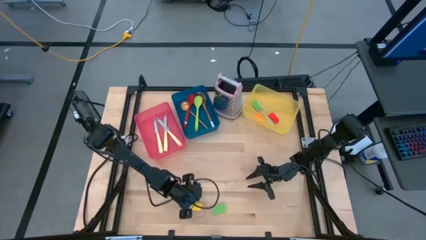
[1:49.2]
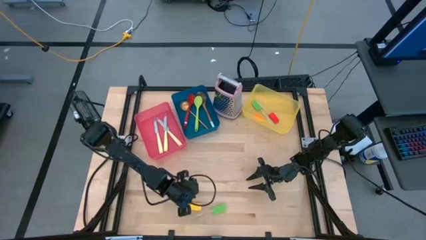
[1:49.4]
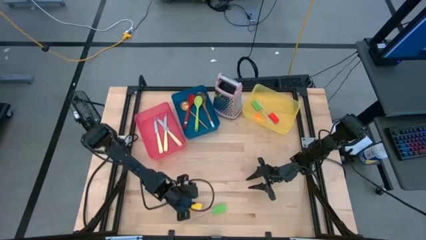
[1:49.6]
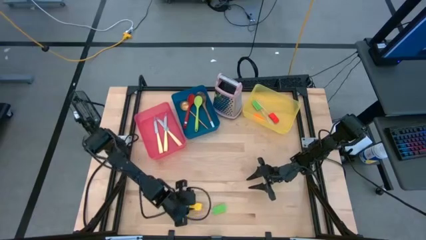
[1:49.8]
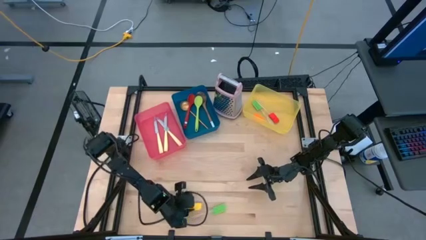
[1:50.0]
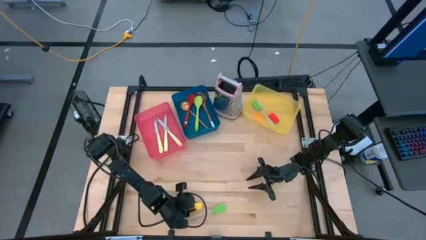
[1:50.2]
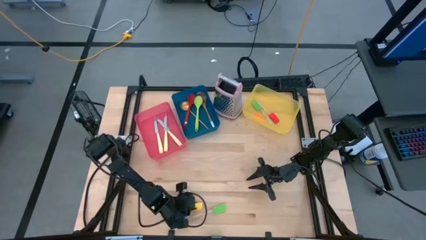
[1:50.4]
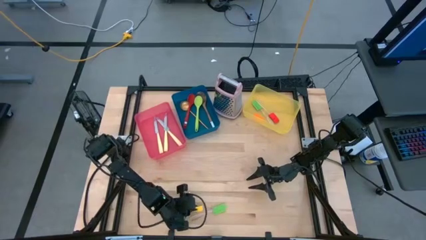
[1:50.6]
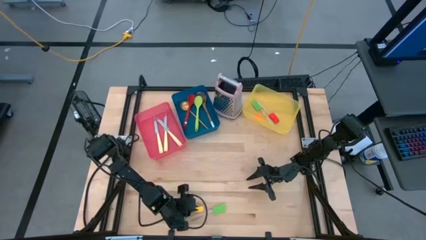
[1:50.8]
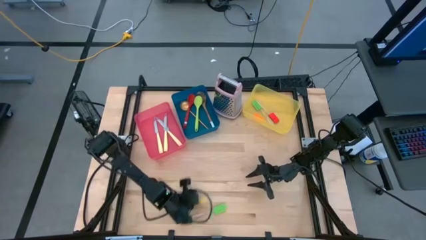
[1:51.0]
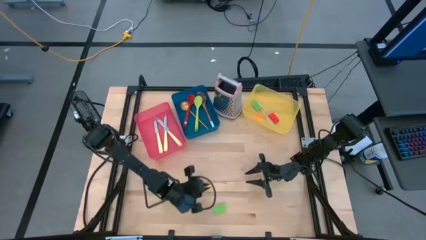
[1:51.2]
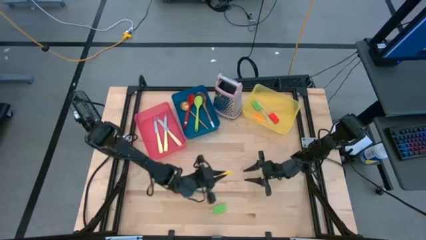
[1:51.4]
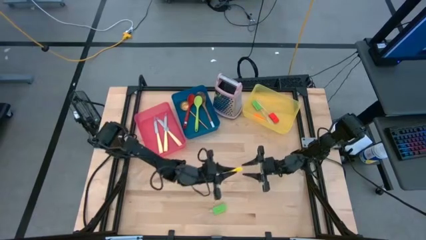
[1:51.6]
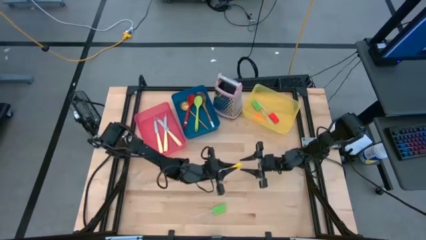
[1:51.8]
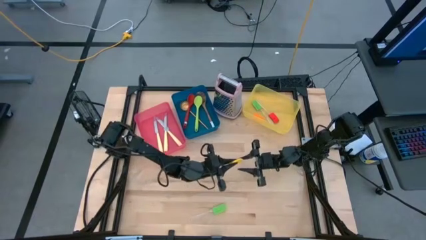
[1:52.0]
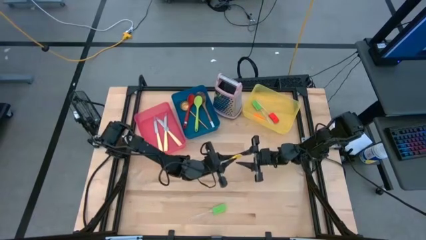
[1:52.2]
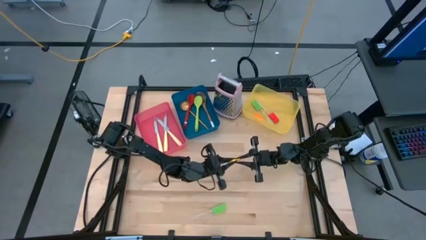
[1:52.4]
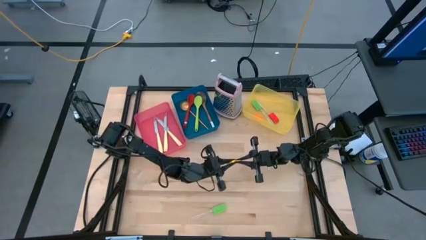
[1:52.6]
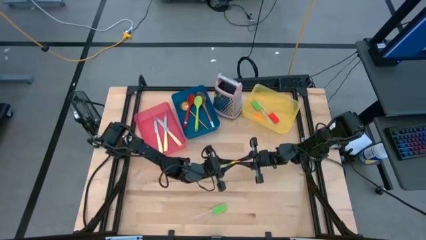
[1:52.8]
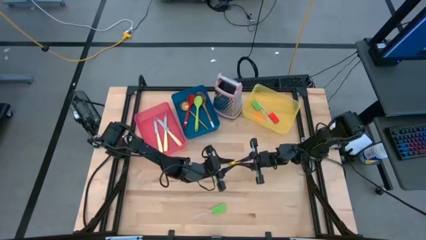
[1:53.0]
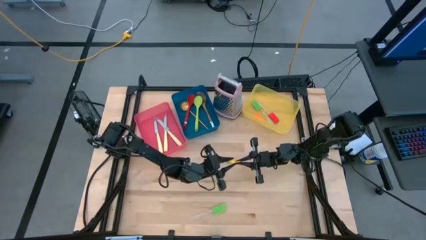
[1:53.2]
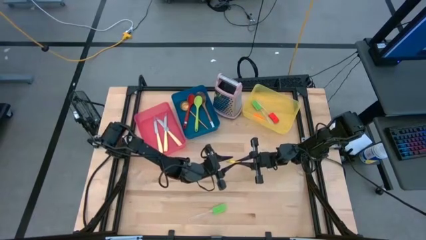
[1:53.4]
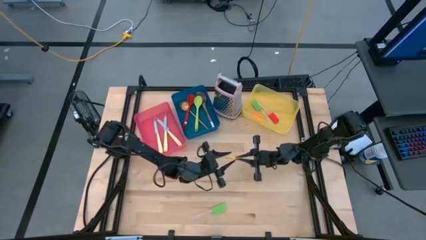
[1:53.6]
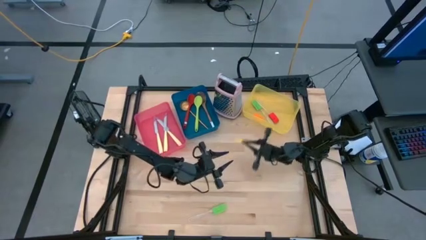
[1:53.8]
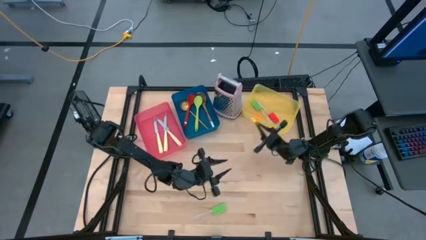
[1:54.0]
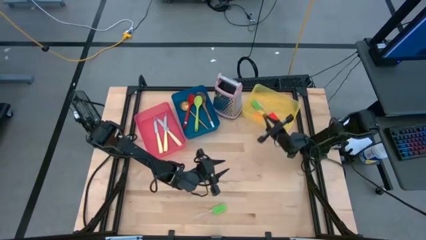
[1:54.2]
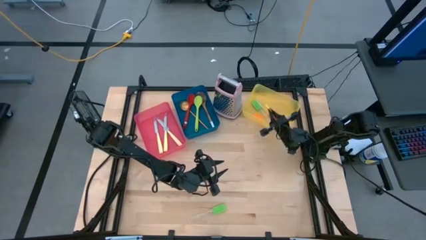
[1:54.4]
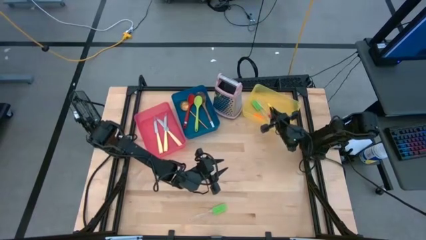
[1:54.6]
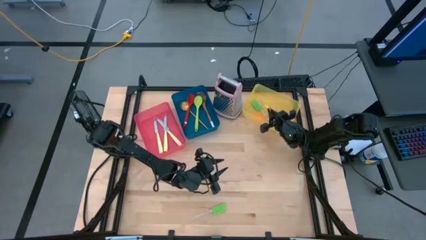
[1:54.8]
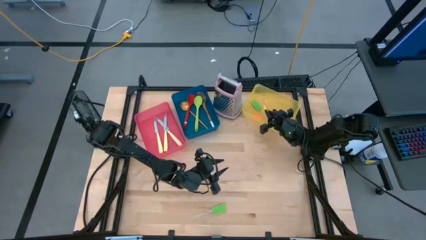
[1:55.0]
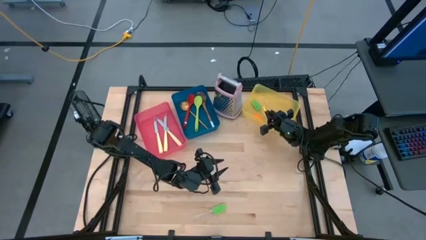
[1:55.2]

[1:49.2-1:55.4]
Task: Pick & Place Kitchen Items
Put the yellow spatula into the yellow bin

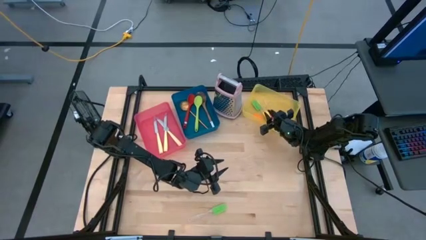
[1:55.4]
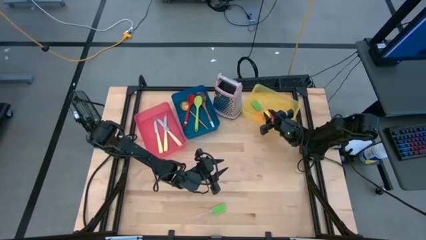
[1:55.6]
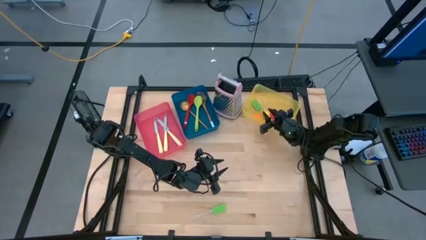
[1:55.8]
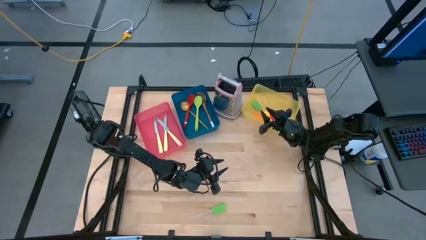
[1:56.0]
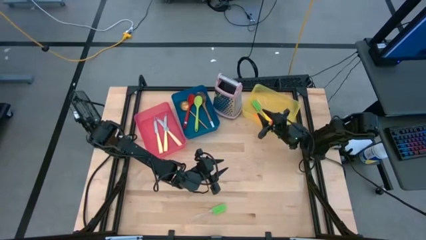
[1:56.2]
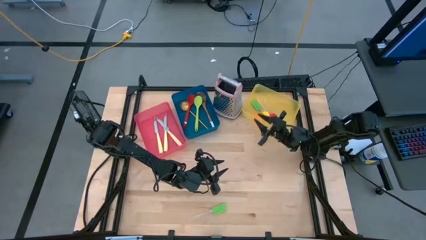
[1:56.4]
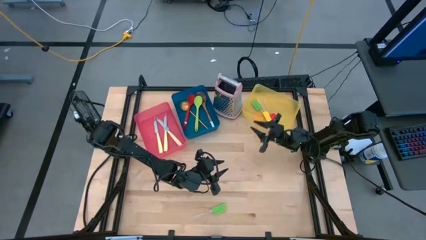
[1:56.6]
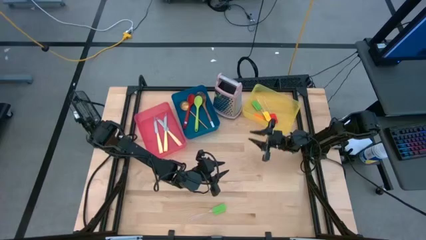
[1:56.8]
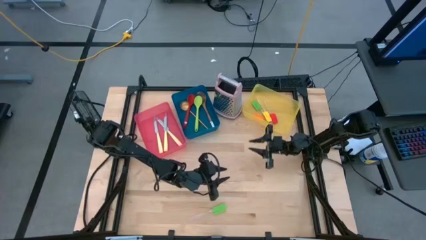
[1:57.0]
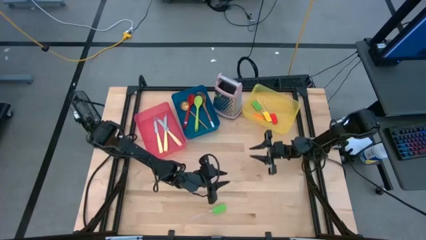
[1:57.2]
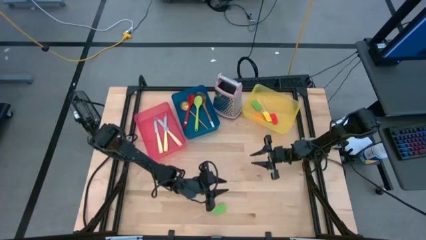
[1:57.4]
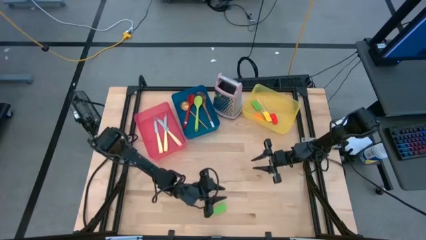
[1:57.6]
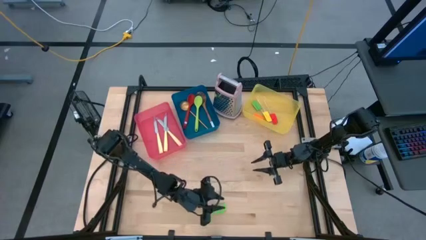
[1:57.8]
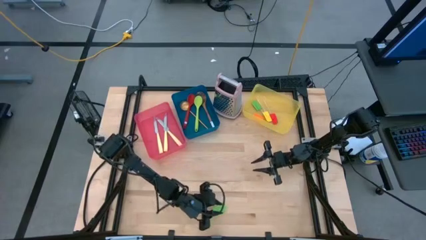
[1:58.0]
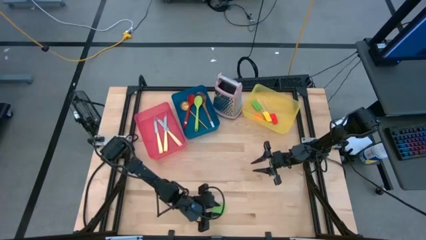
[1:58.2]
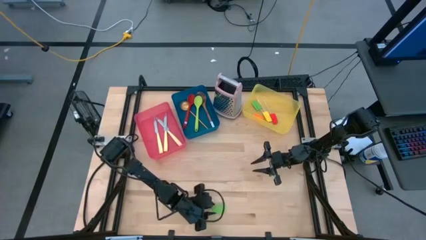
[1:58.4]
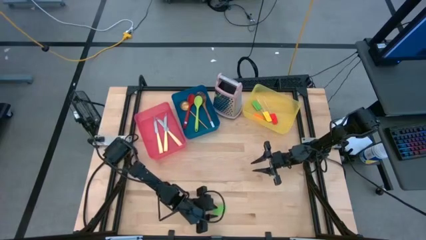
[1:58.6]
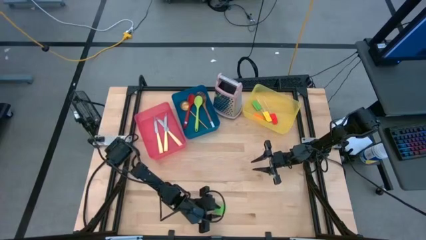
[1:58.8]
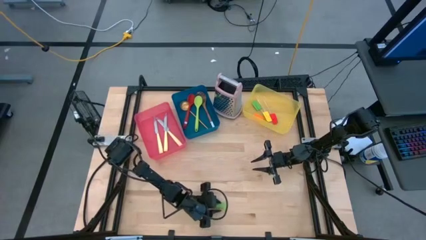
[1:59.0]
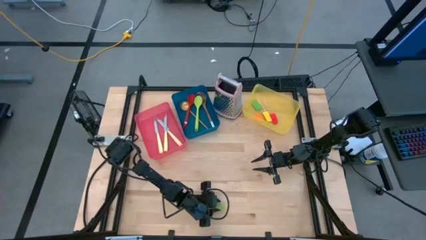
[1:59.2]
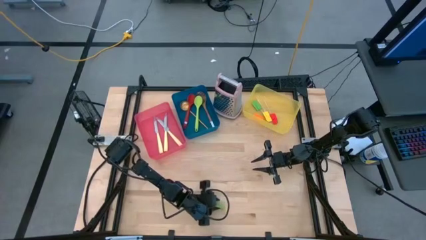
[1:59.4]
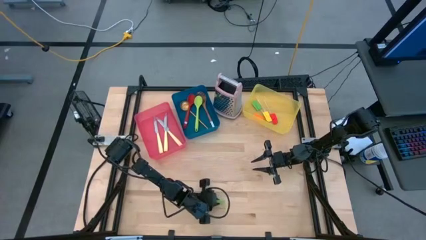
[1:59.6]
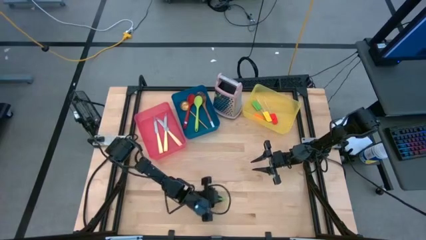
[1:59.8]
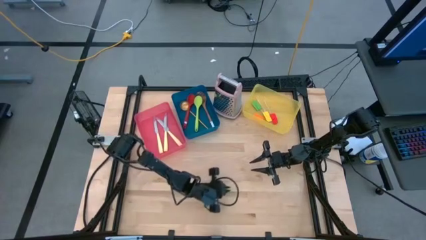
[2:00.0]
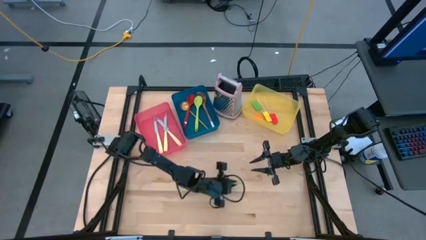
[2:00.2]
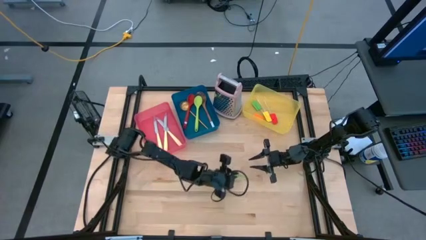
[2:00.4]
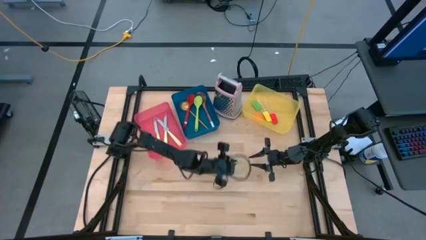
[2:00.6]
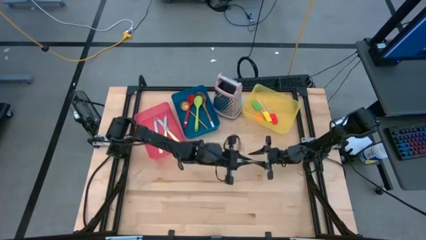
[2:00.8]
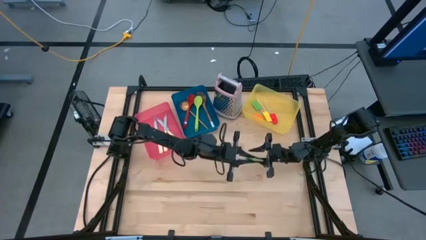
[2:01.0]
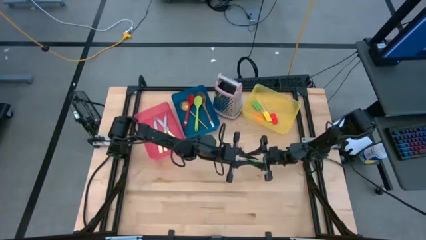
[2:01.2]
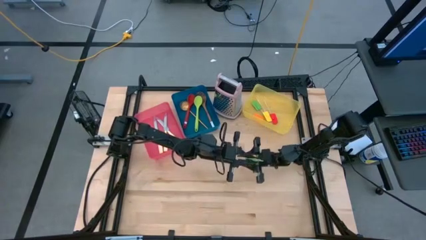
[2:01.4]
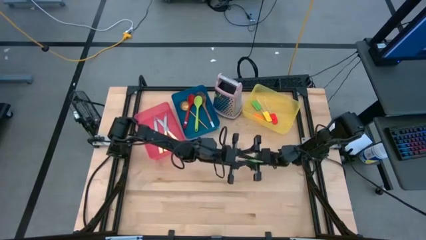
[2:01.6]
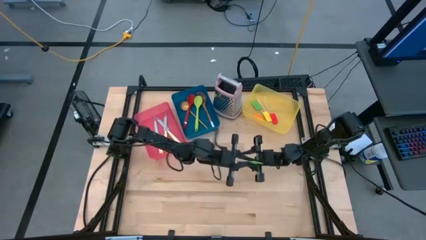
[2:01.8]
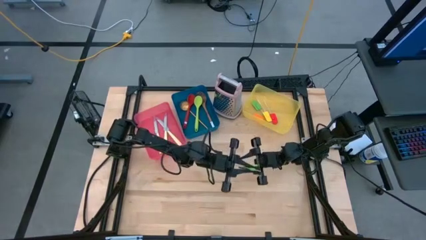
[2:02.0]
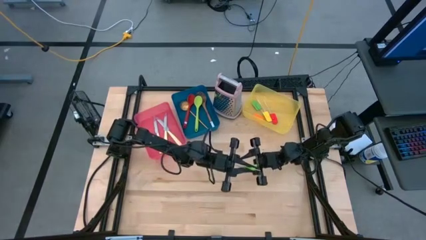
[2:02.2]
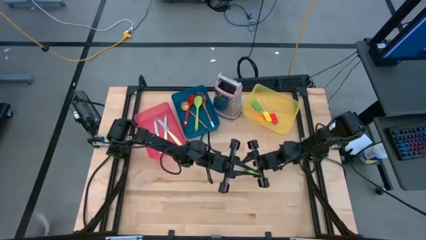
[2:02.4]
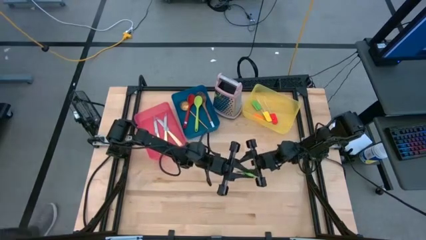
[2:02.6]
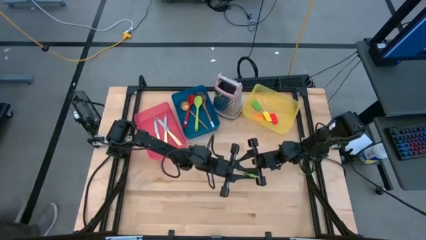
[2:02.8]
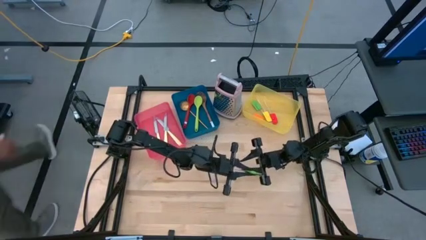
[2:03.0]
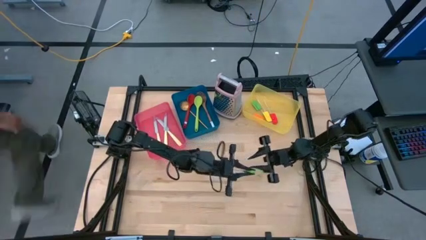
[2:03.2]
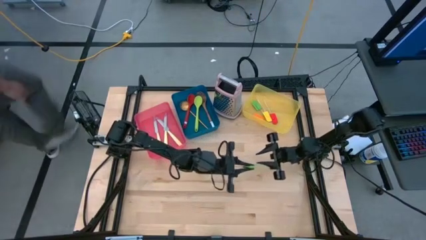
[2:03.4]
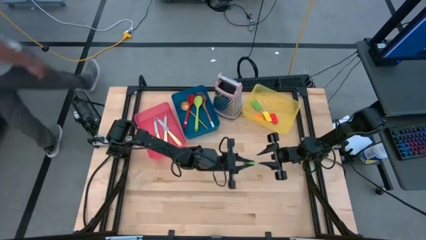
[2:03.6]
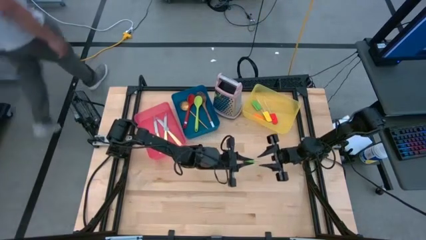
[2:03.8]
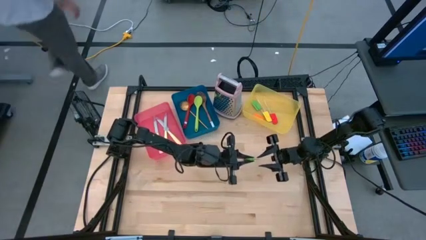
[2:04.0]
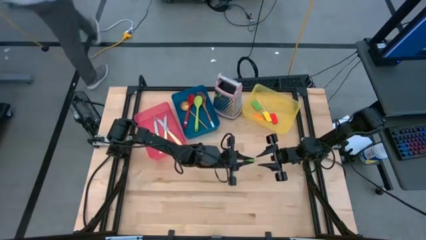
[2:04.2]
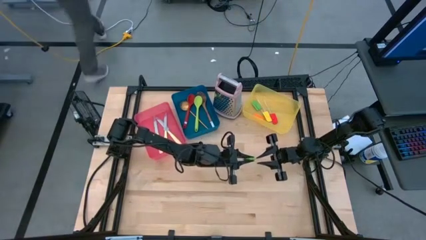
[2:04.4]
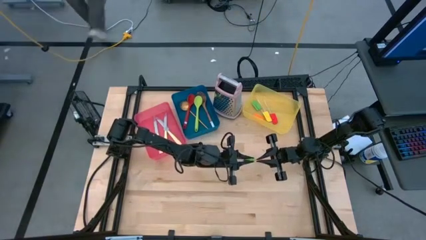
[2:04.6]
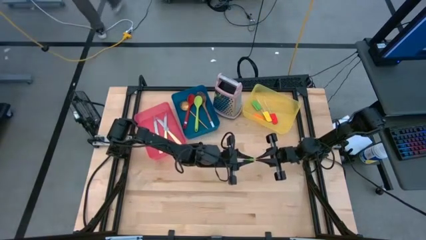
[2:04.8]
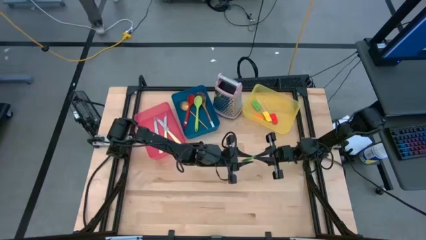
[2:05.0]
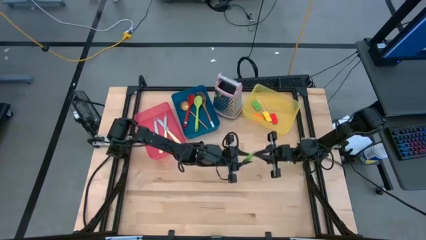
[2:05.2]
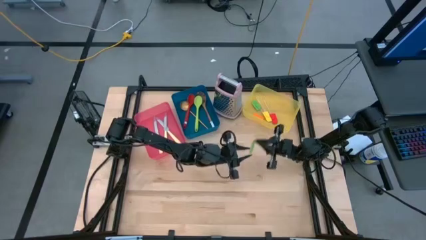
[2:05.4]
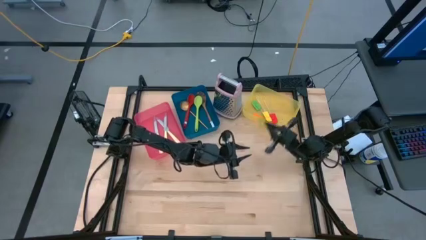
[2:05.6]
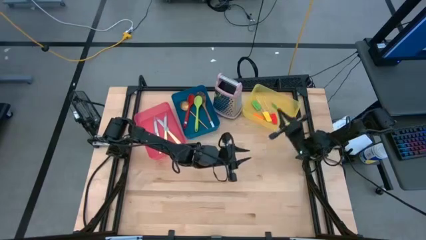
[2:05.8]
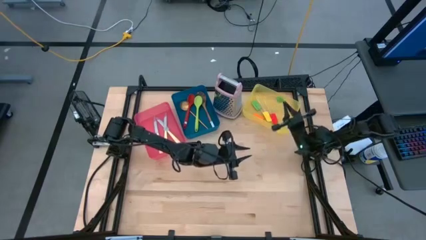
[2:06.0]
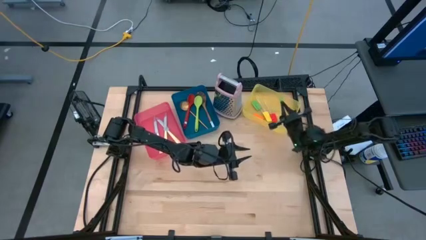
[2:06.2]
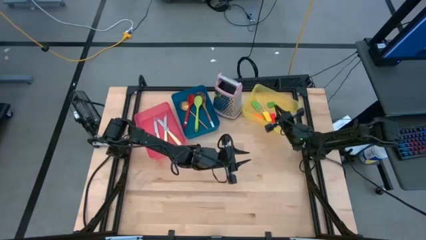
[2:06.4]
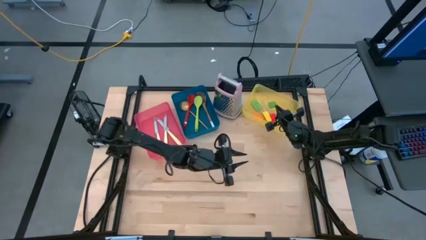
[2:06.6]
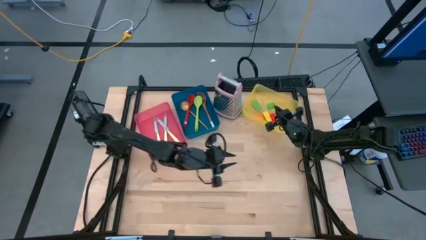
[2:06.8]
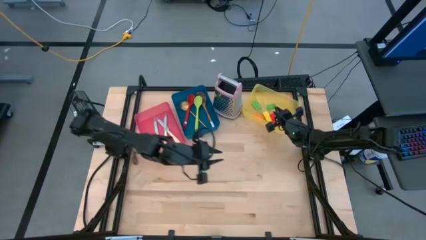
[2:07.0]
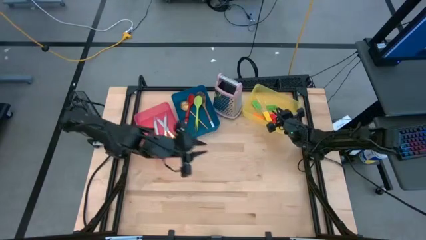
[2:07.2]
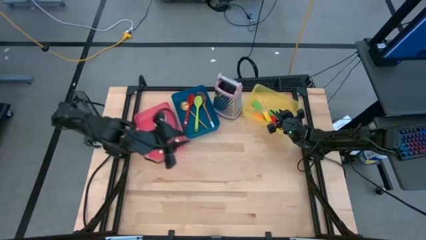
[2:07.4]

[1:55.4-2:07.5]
Put the green spatula into the yellow bin
